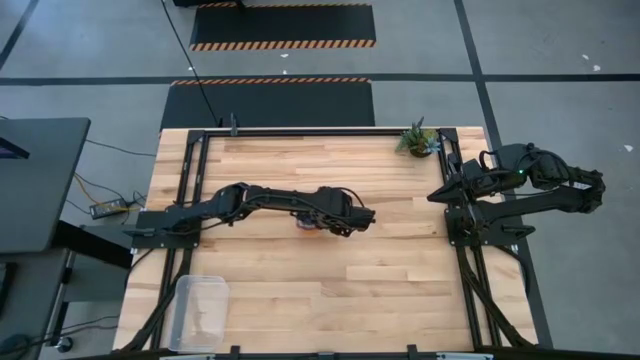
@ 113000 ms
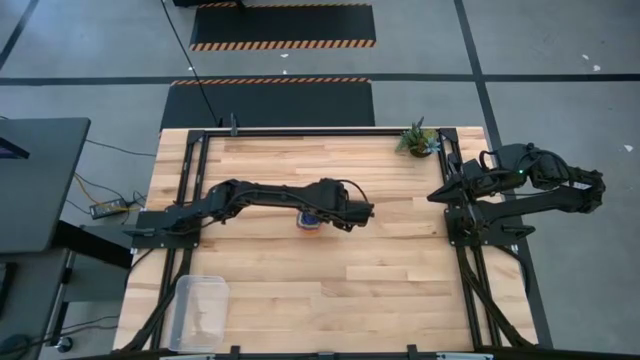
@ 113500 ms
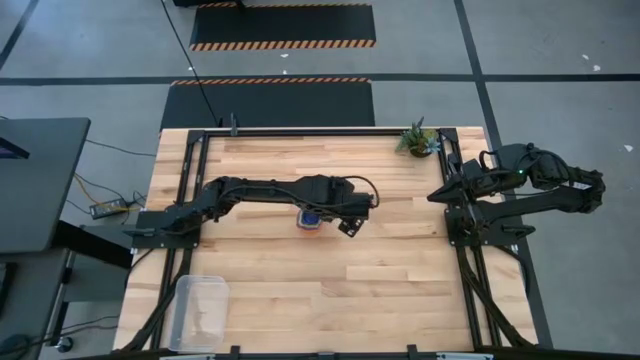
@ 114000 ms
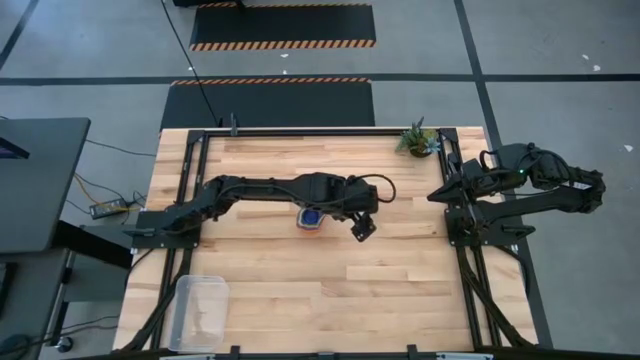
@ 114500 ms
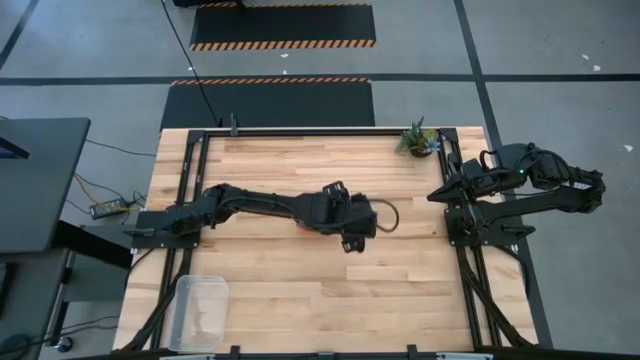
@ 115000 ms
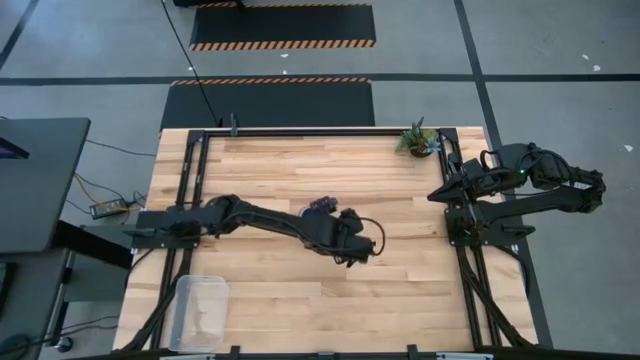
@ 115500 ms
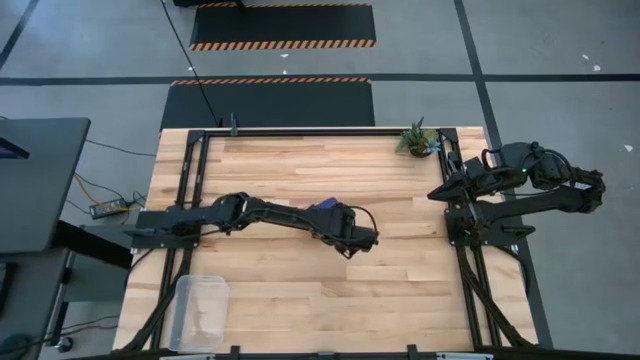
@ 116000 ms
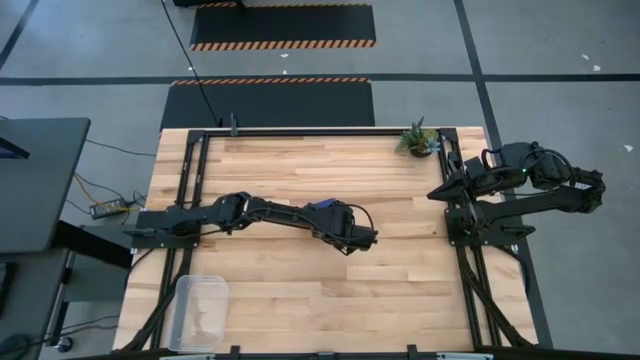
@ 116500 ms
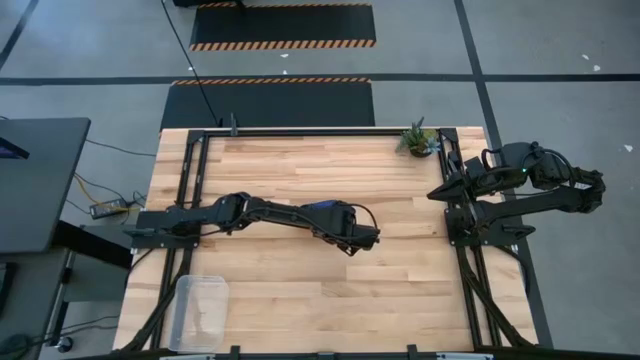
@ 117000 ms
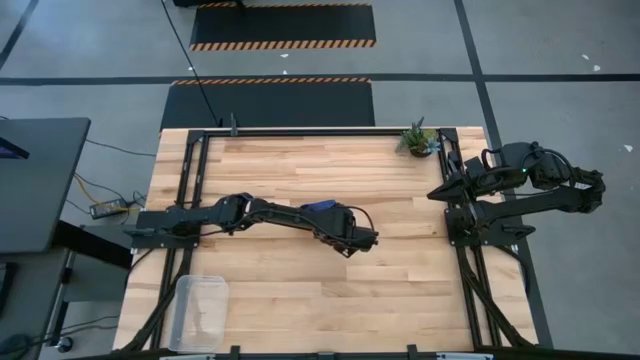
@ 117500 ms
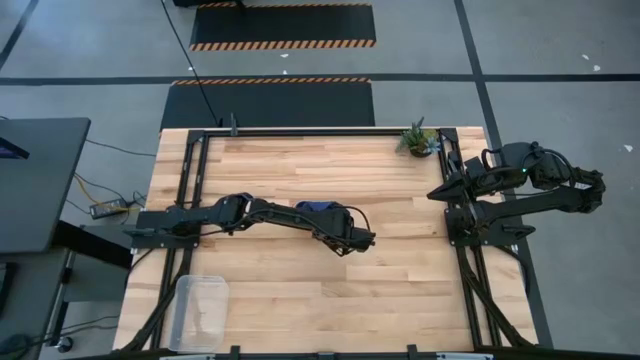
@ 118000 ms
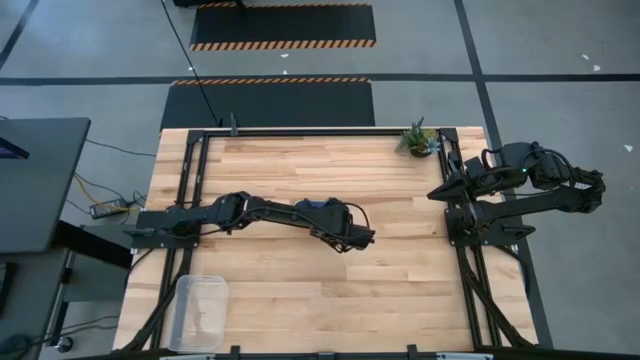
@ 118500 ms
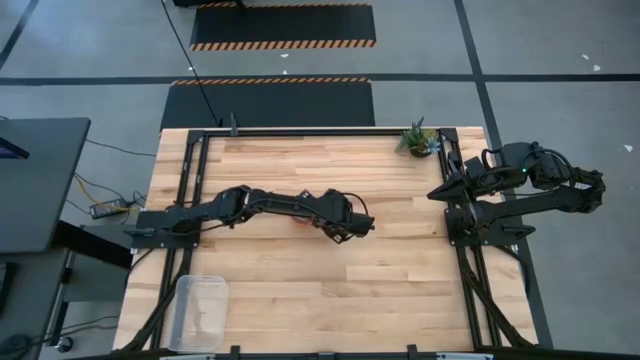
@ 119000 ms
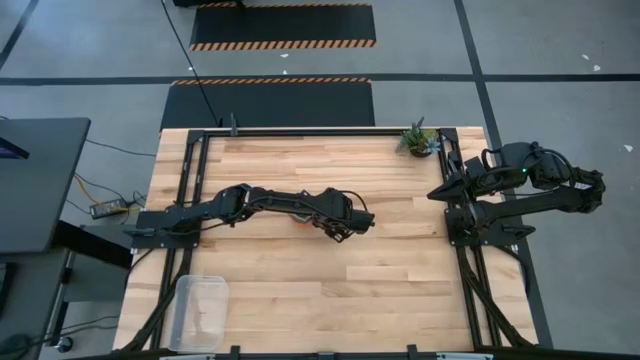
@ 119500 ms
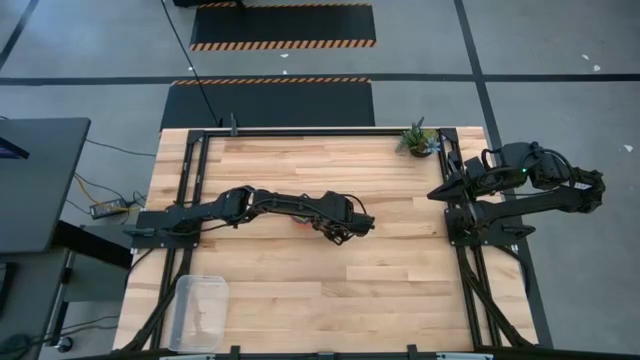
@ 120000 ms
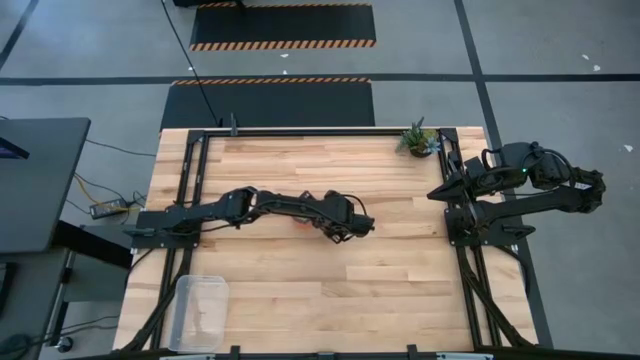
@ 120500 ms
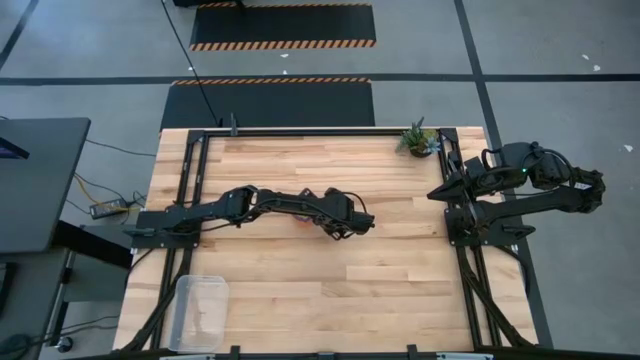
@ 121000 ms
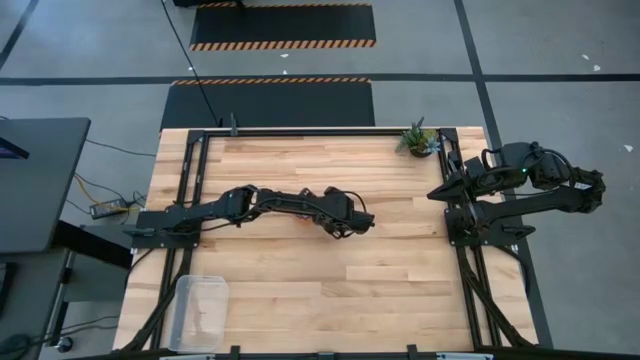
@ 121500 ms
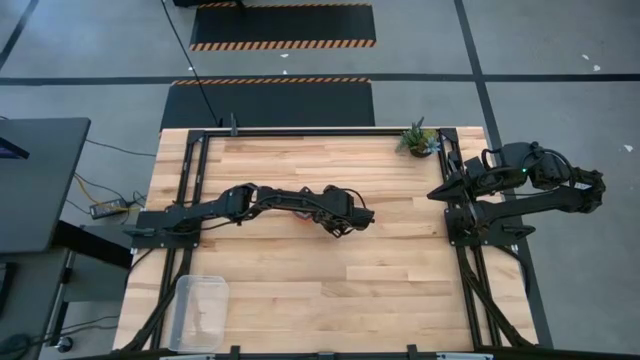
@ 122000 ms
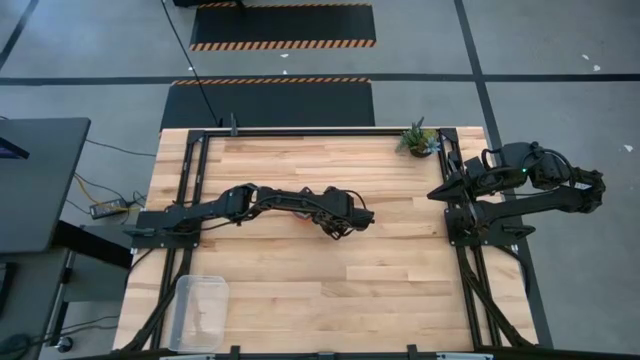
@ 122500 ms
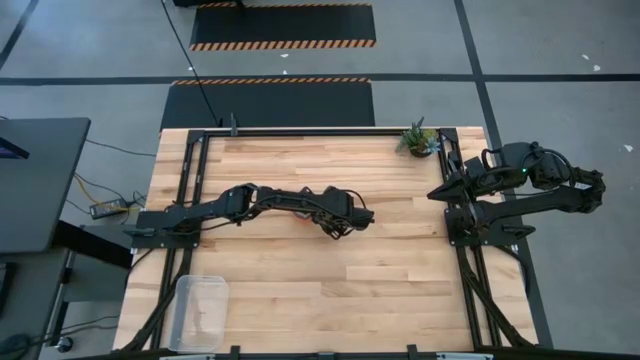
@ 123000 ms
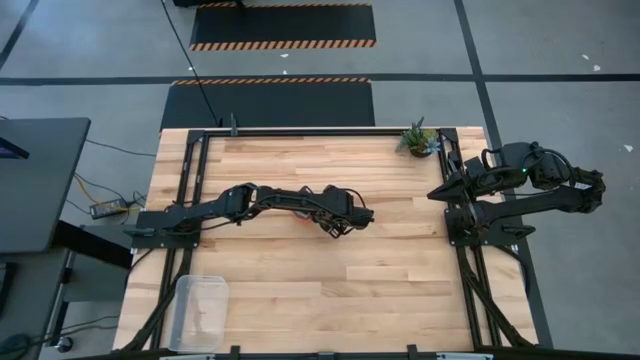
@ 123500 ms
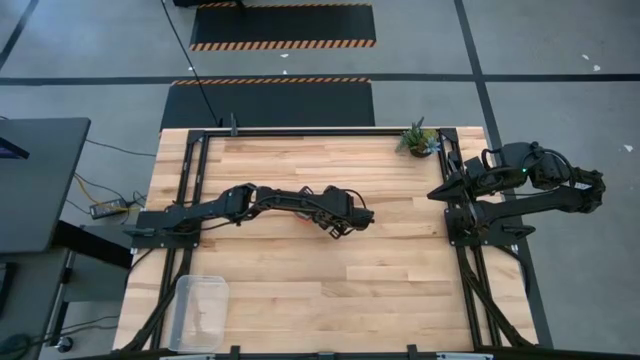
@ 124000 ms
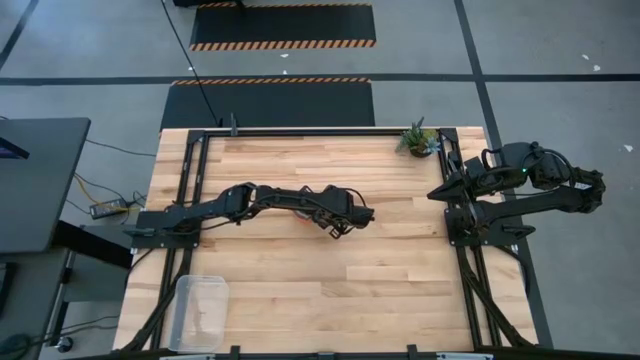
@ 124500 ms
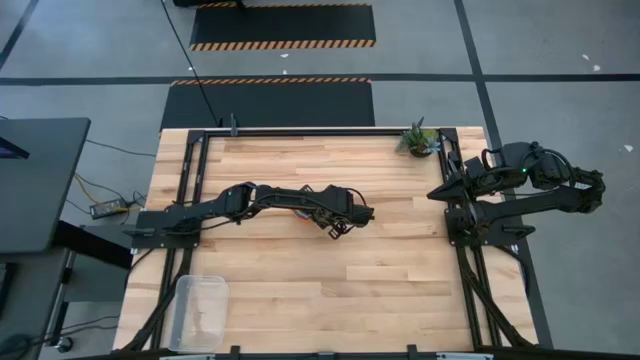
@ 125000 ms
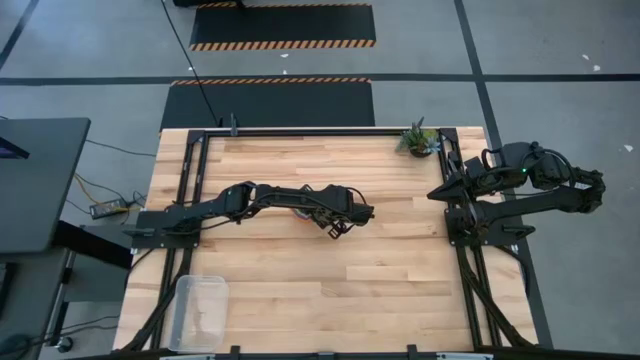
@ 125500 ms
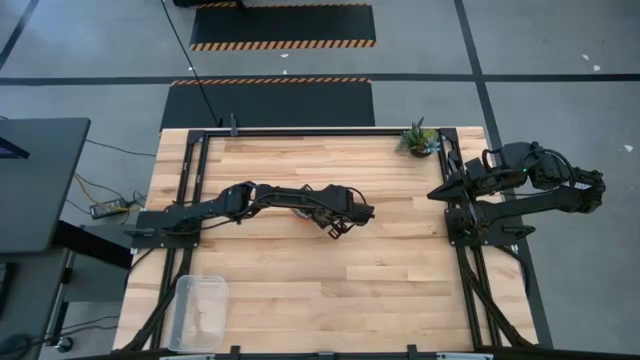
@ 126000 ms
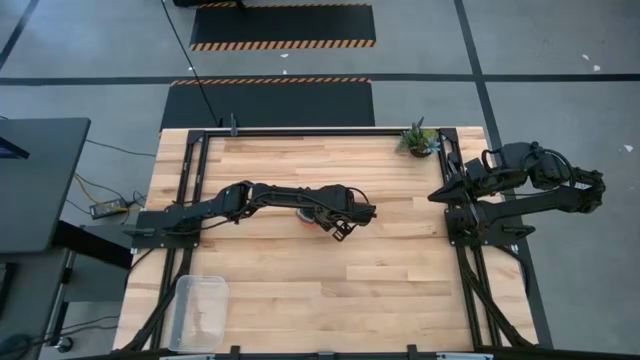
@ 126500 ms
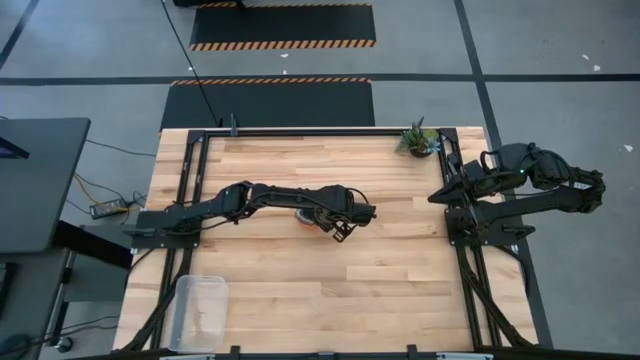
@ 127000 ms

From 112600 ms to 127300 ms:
Task: Nest measuring cups in basket
Put the stacked measuring cups into the transparent bin

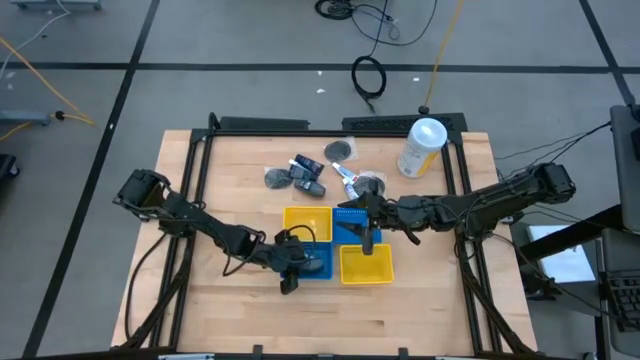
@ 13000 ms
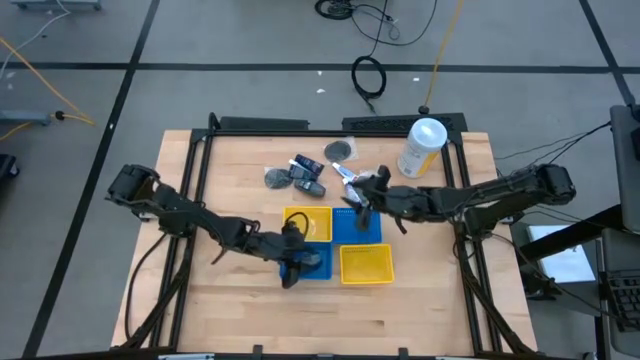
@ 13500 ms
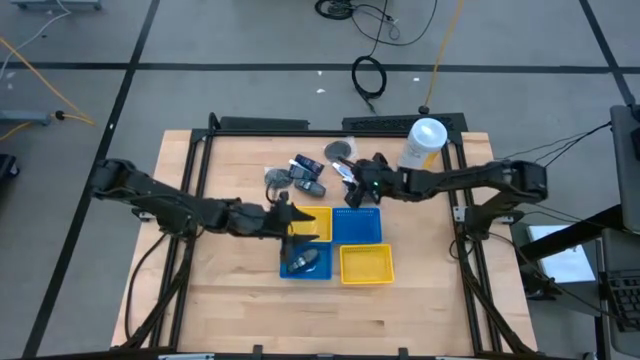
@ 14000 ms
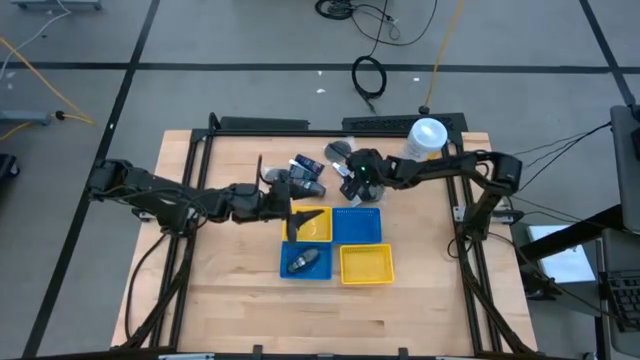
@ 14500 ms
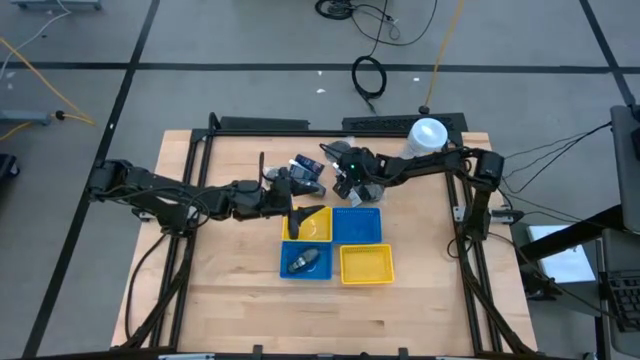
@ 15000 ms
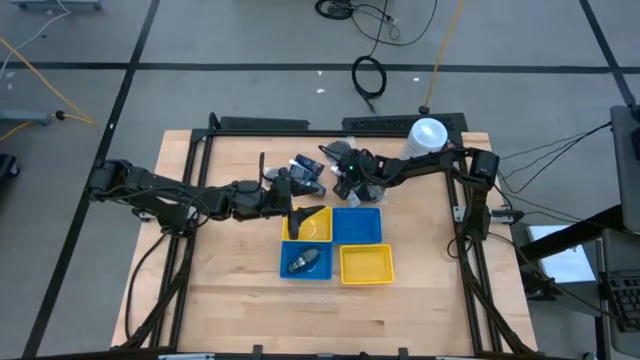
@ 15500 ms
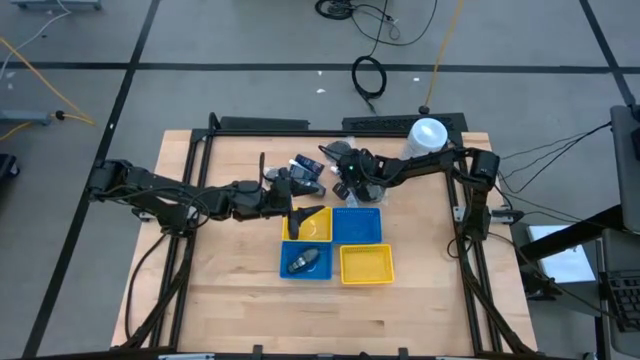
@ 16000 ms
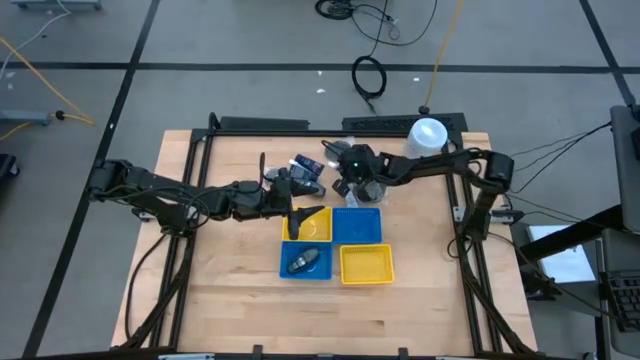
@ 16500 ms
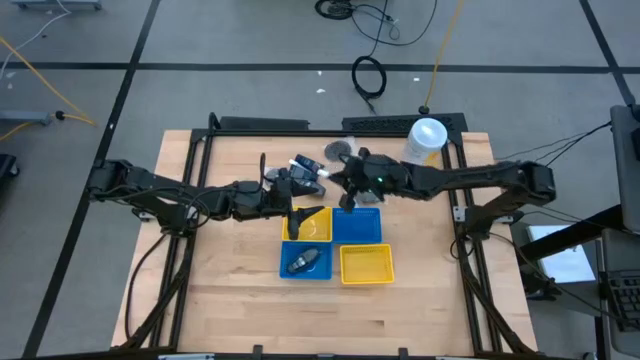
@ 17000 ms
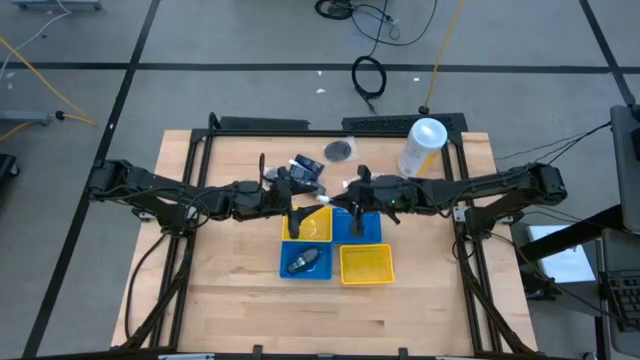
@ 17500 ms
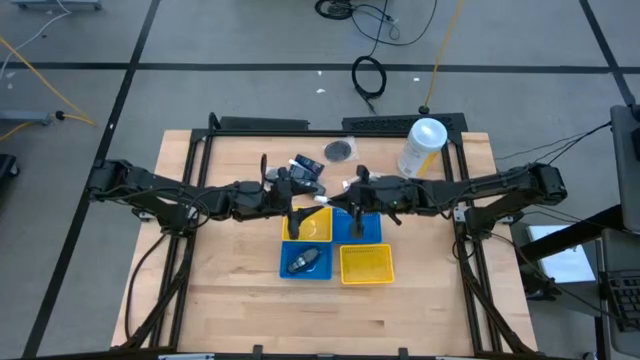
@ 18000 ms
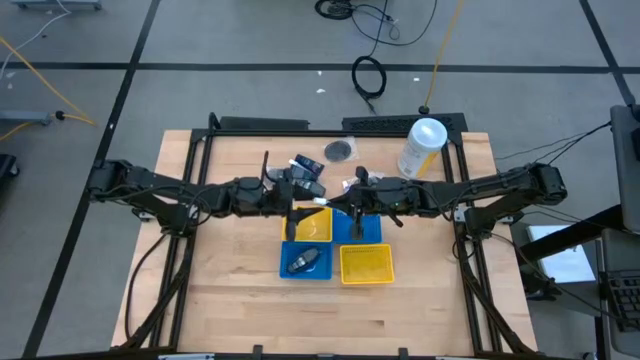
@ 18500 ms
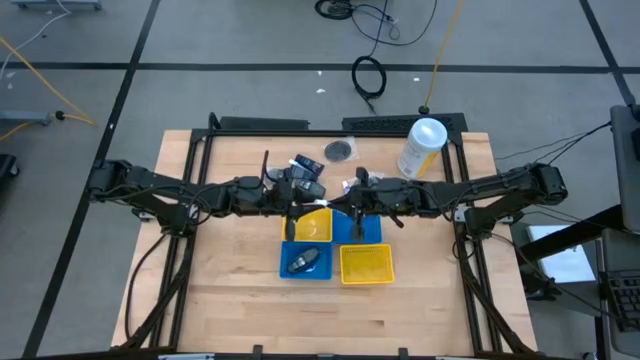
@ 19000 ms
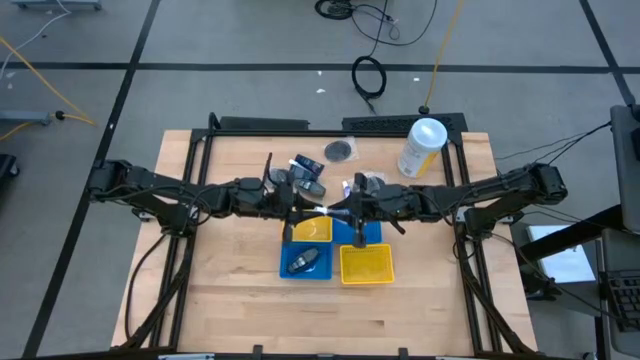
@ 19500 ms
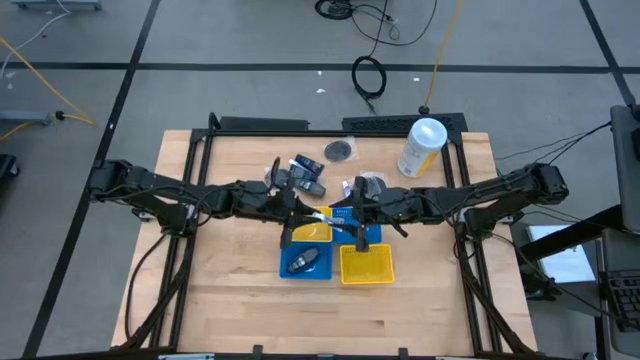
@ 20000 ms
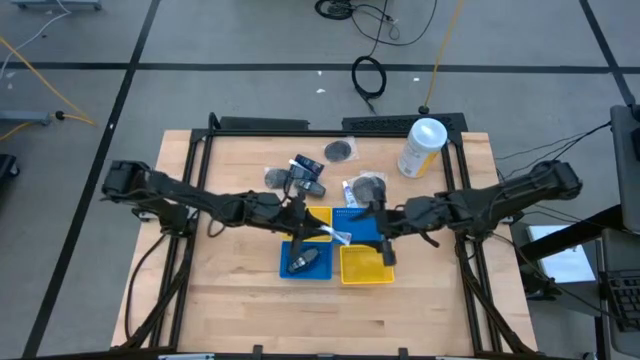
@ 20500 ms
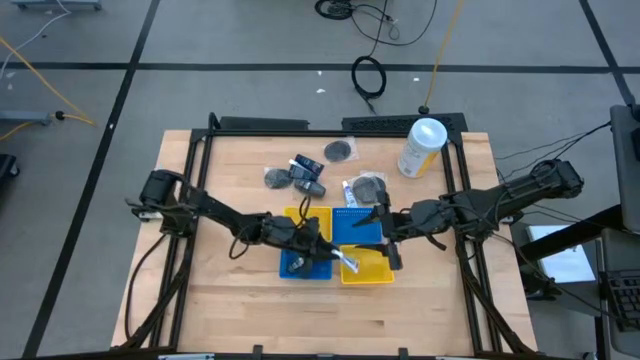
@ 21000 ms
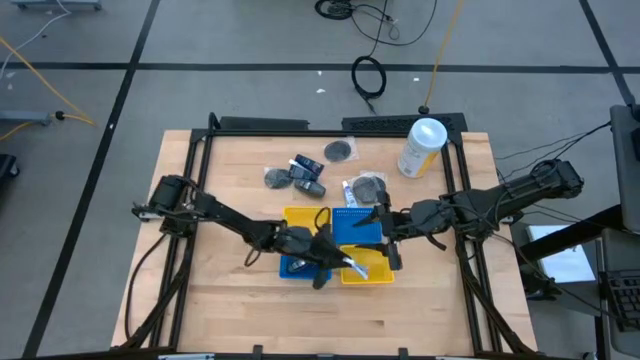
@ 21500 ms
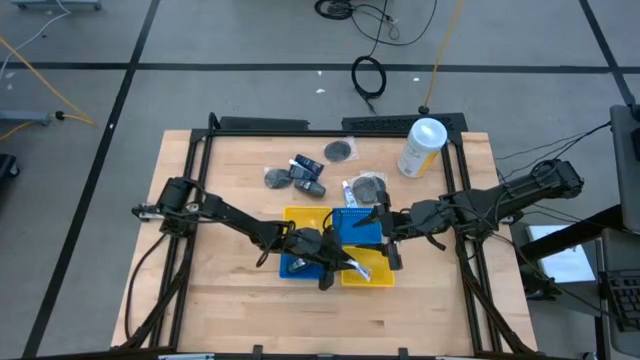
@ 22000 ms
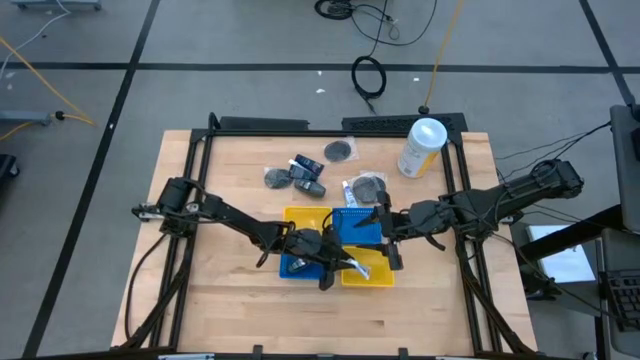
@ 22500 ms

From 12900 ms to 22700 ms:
Task: Pick & Place Travel size toiletries
Put the white toothpaste into the bottom yellow basket
